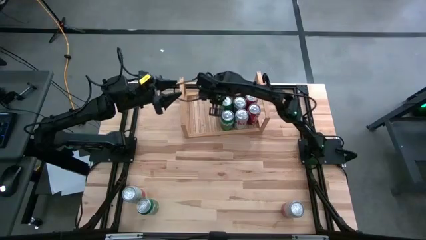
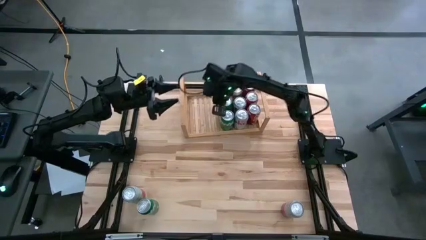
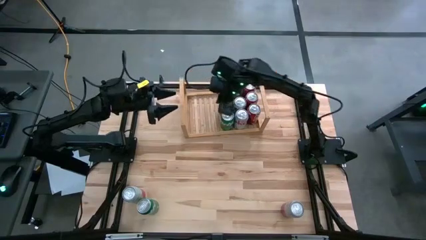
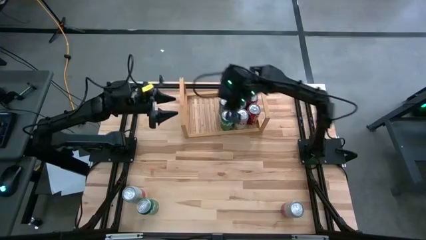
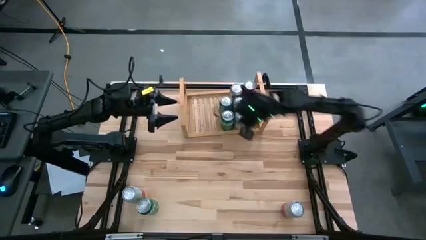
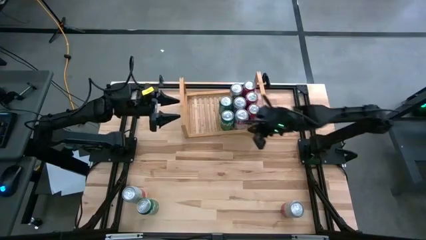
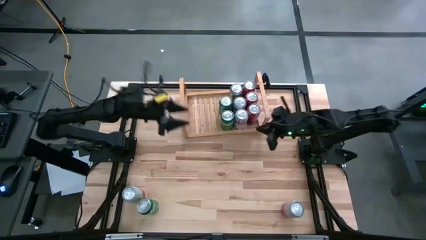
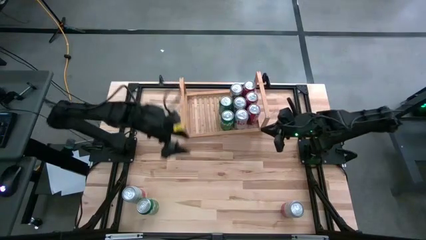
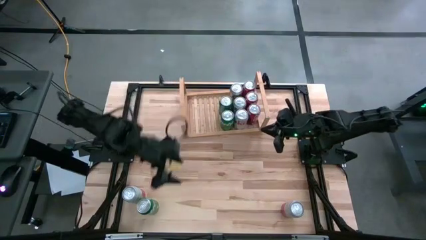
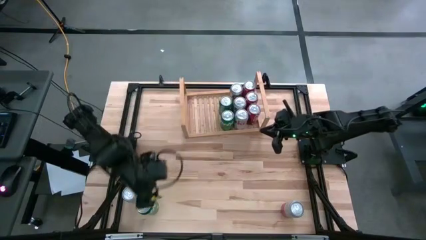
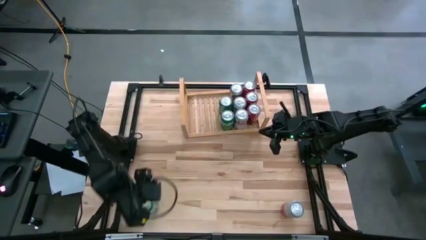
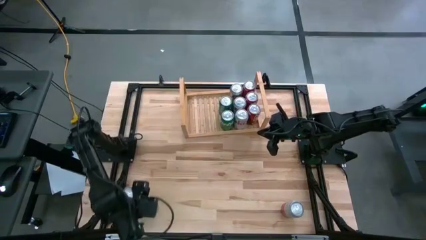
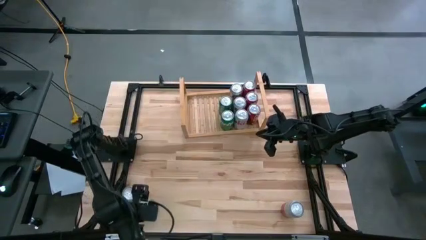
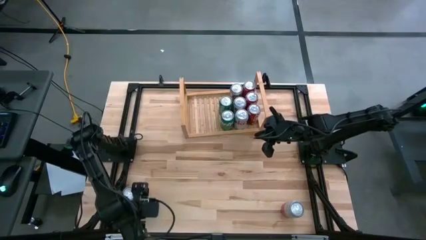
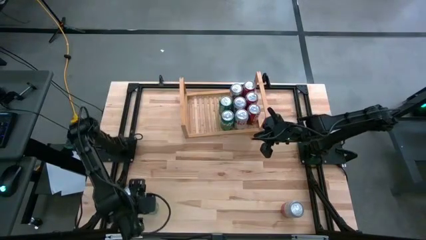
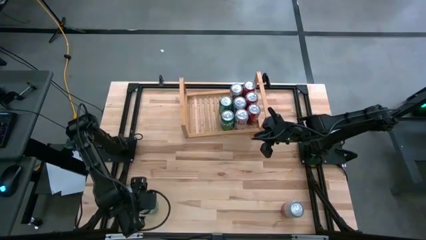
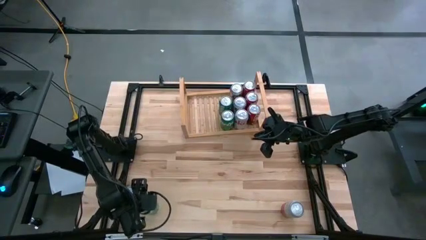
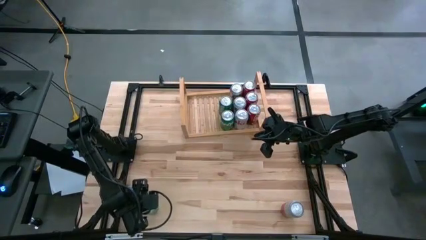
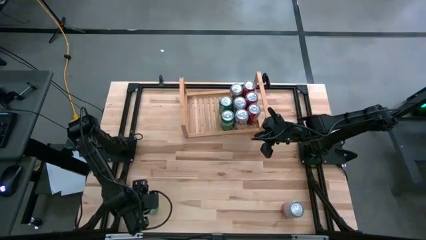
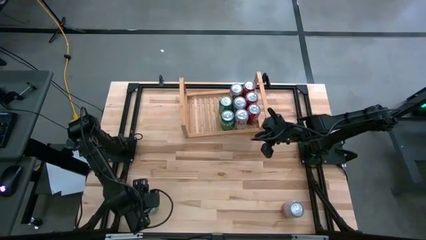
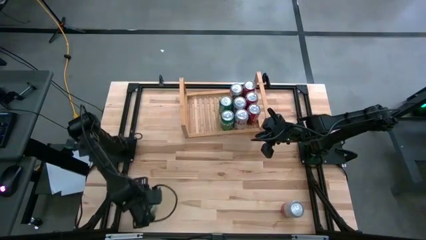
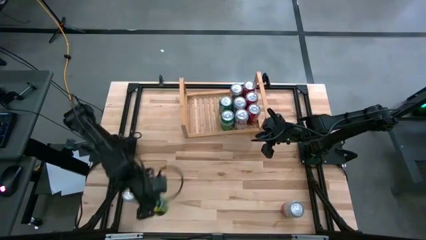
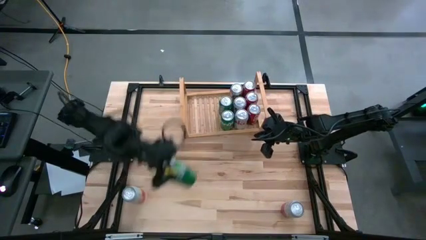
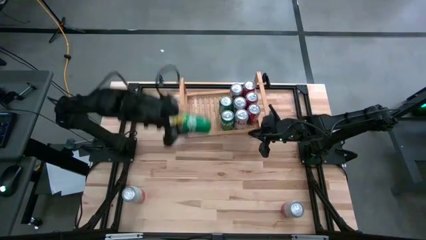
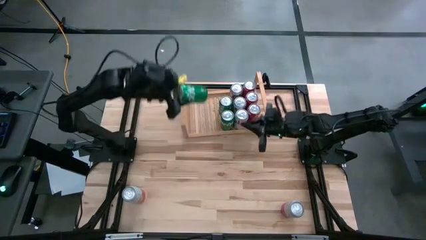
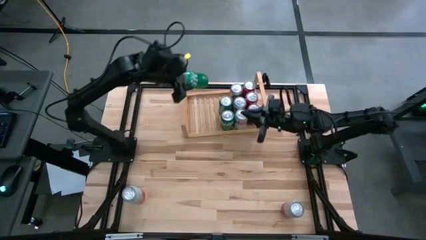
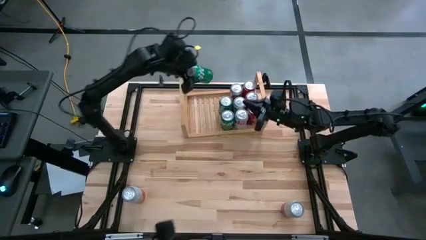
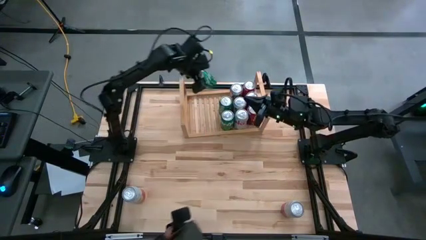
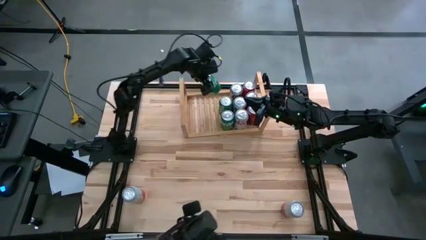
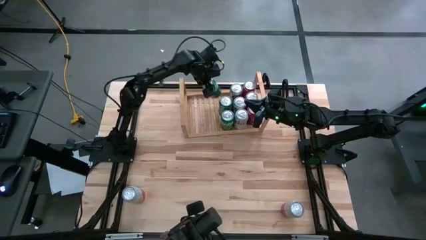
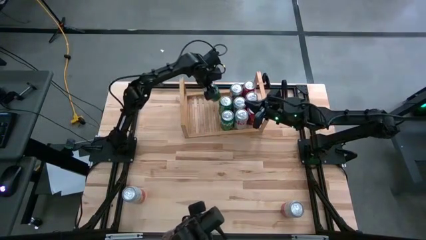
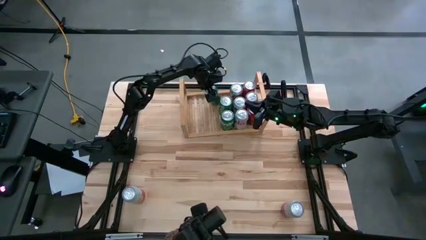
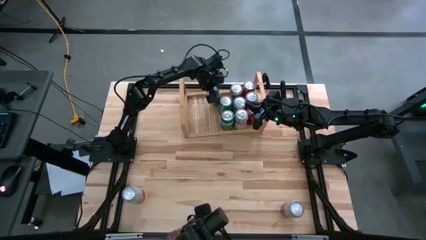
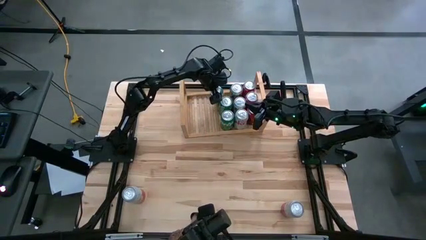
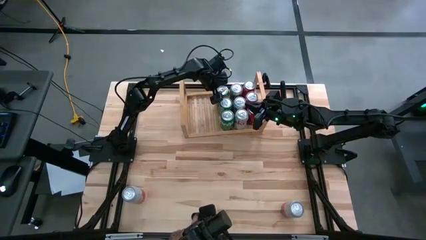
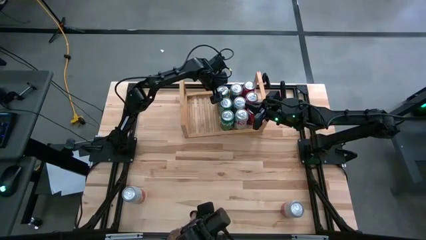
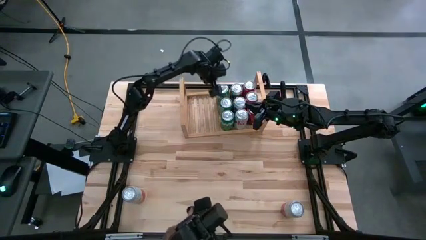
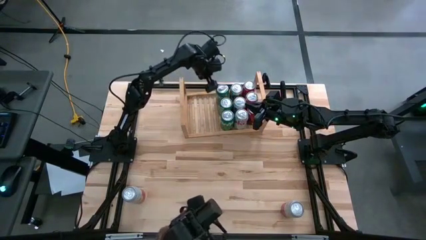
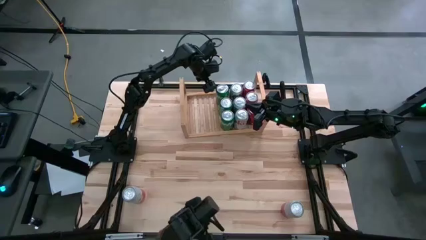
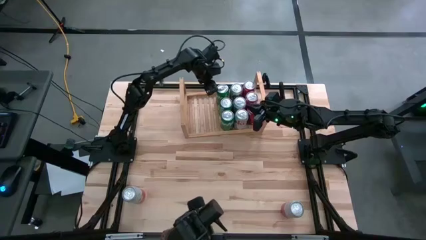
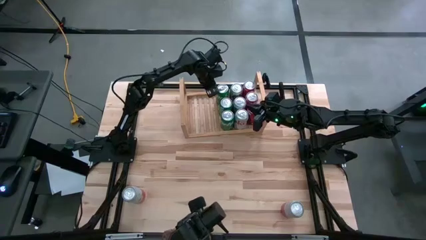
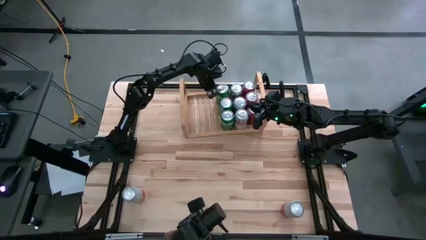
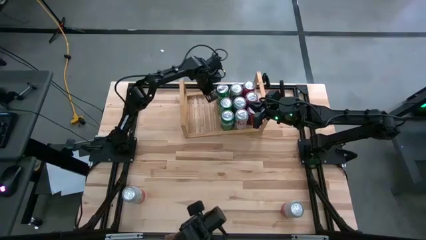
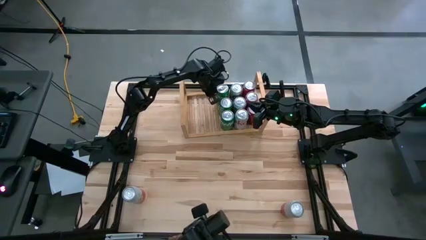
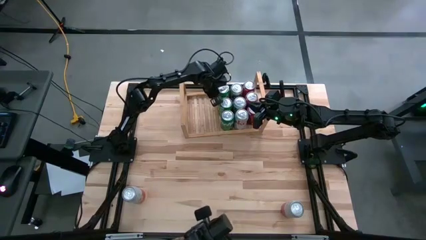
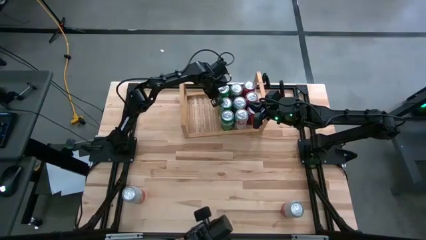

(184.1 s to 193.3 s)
Task: Place canned beverage on shelf
Put the green soda can on the shelf aligned with the other green soda can on the shelf

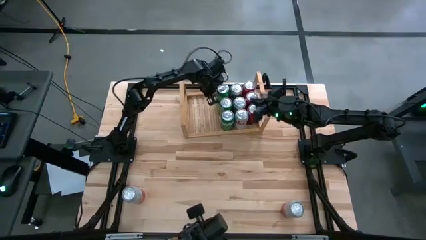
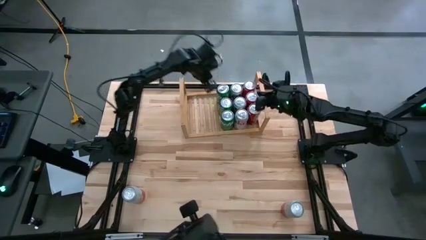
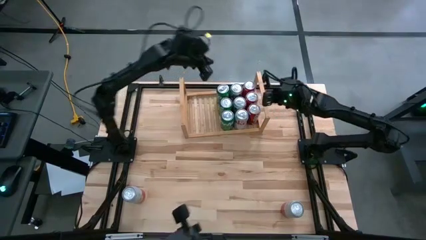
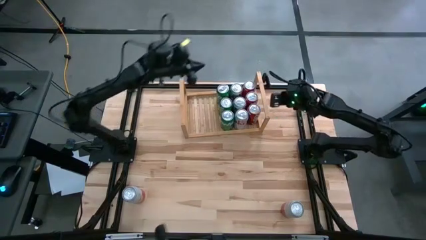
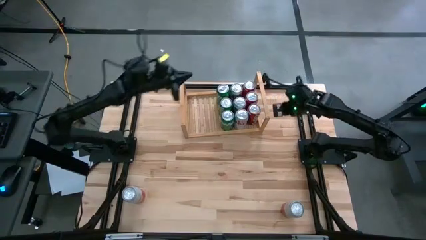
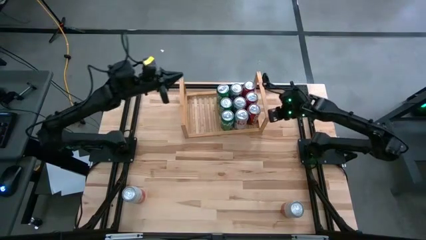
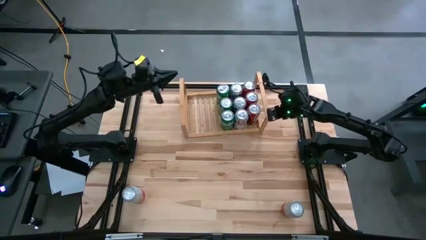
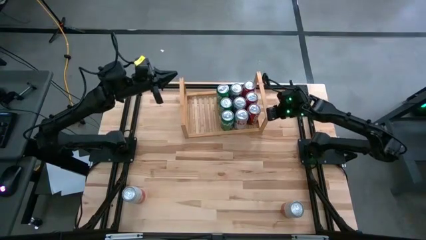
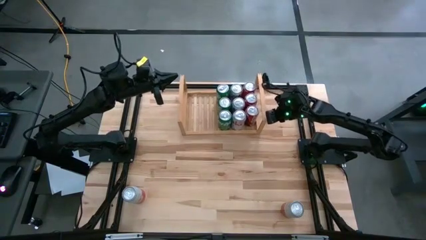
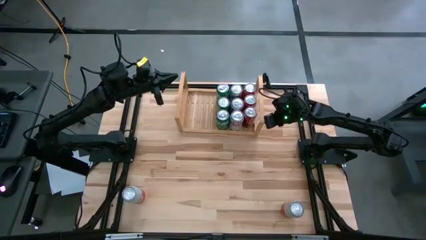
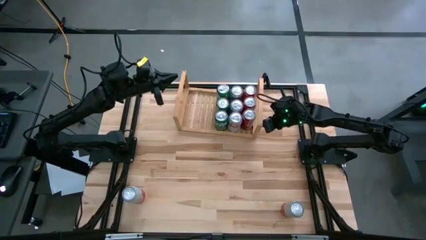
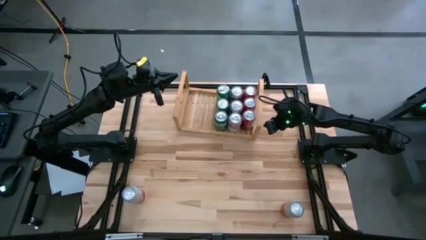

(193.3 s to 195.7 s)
Adjust the shelf on the table

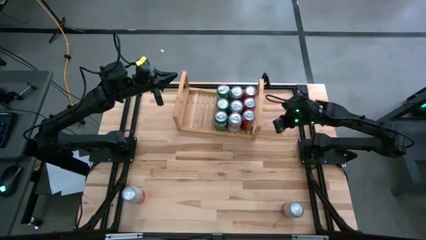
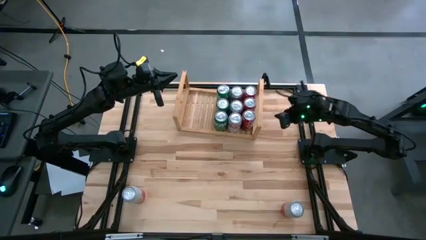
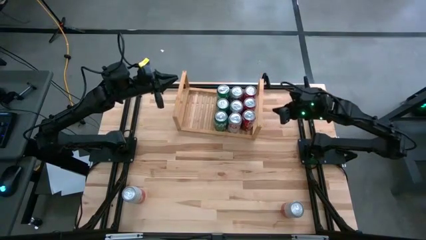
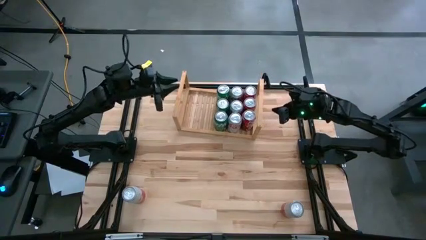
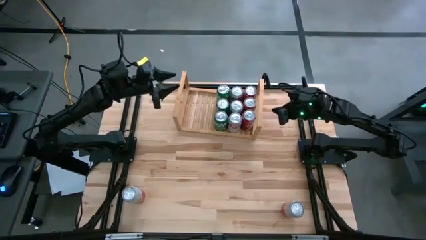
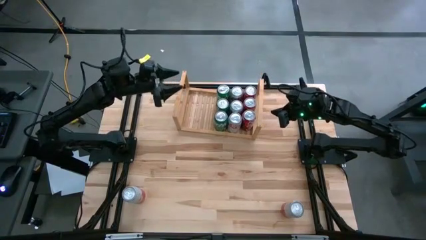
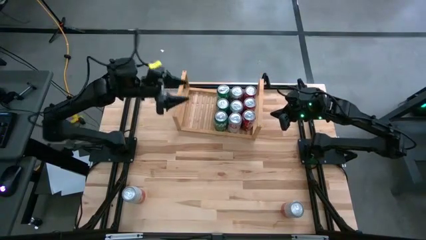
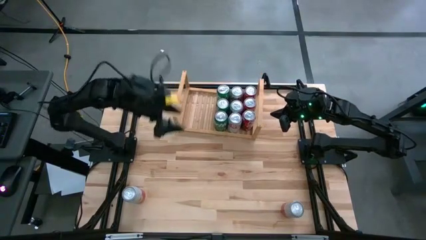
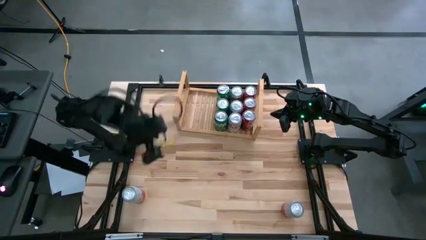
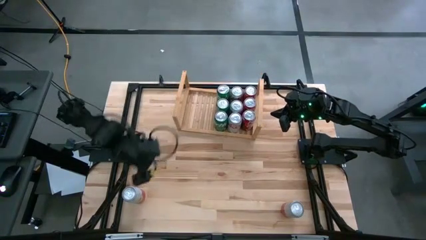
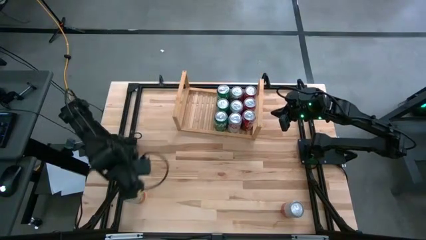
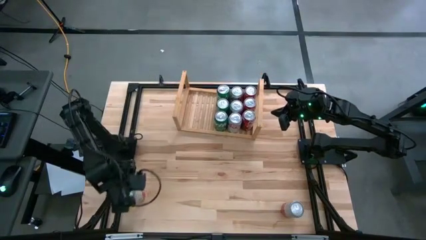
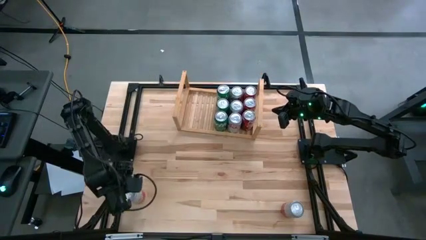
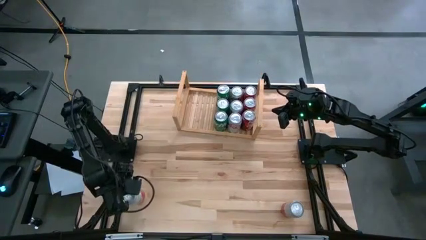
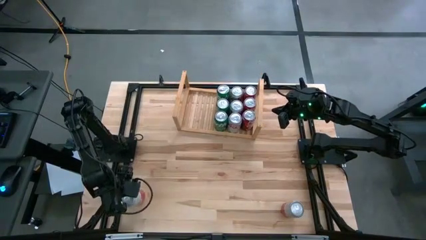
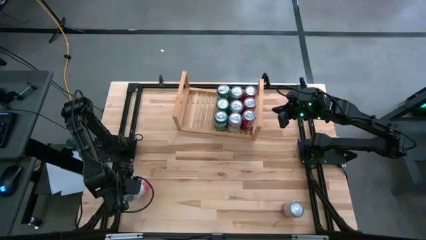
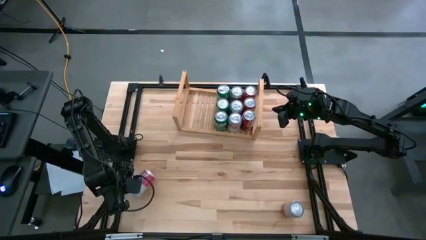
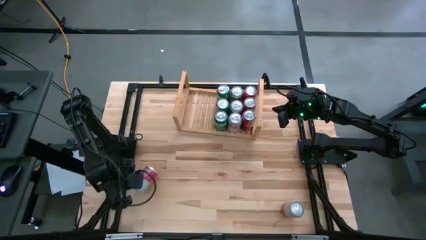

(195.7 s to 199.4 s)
Put the left pink-white soda can on the shelf
